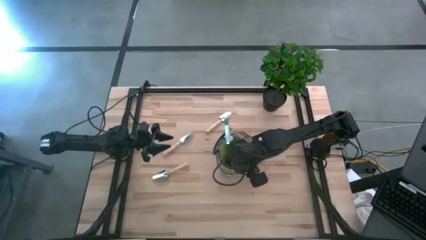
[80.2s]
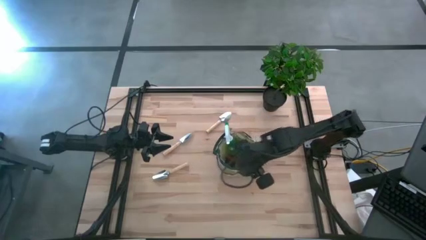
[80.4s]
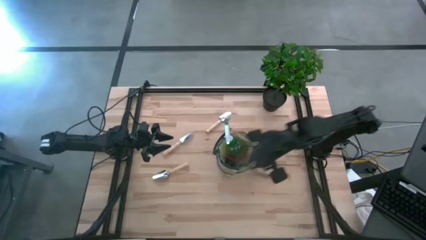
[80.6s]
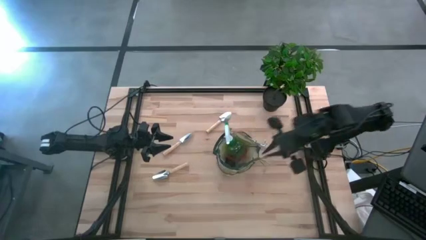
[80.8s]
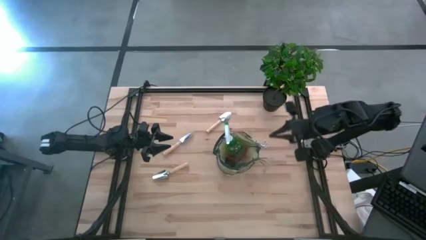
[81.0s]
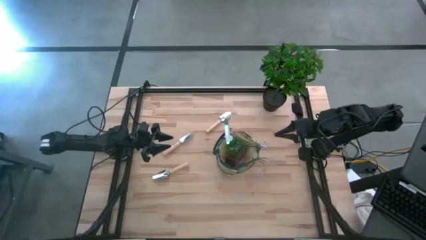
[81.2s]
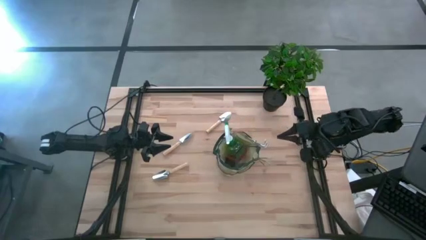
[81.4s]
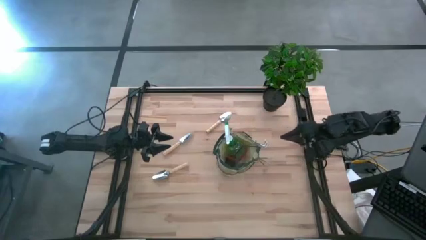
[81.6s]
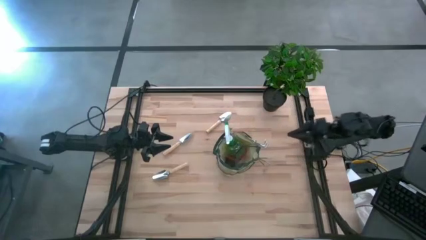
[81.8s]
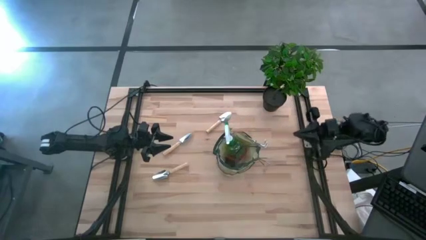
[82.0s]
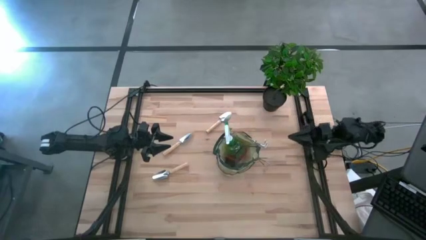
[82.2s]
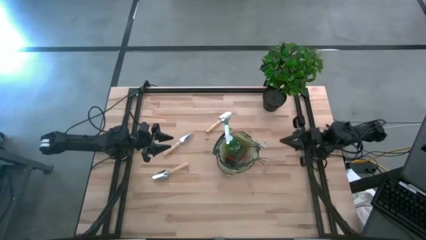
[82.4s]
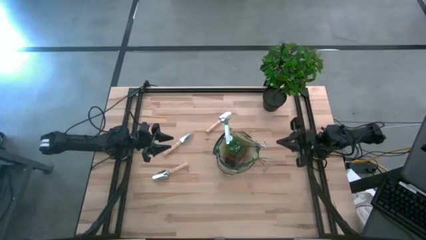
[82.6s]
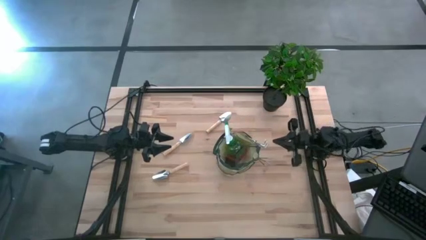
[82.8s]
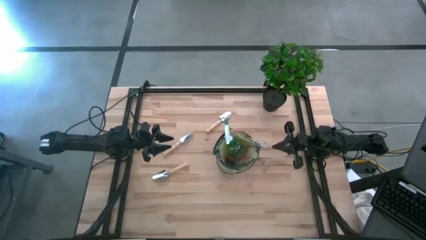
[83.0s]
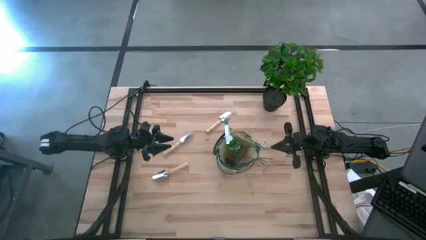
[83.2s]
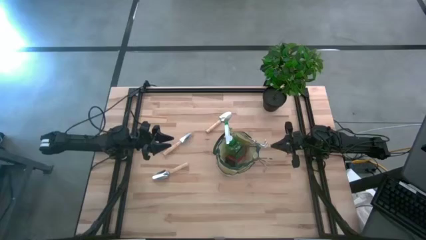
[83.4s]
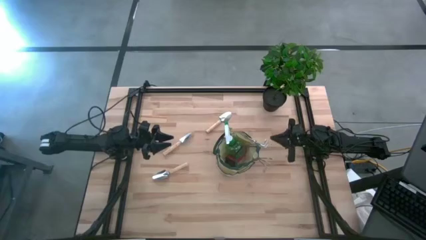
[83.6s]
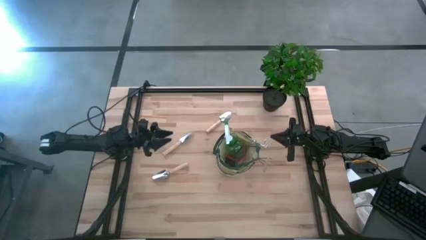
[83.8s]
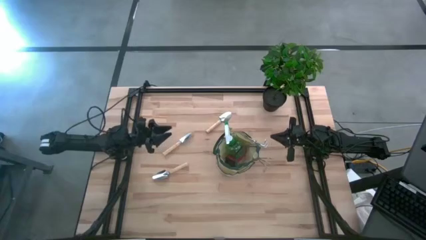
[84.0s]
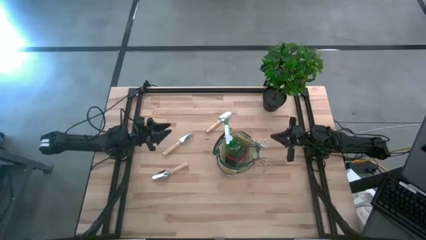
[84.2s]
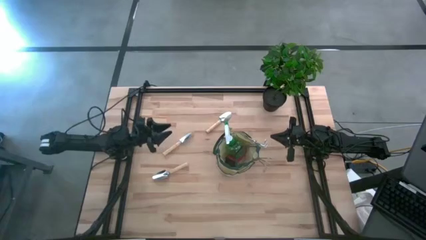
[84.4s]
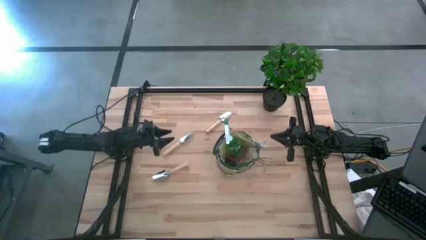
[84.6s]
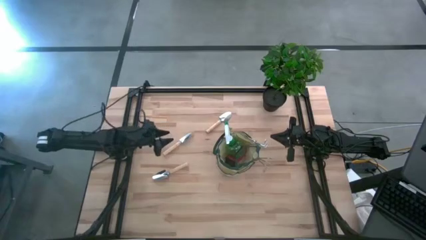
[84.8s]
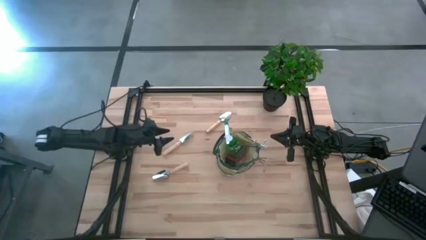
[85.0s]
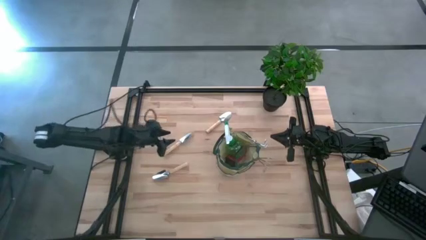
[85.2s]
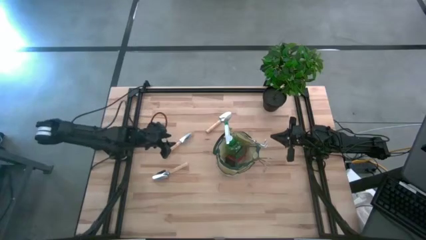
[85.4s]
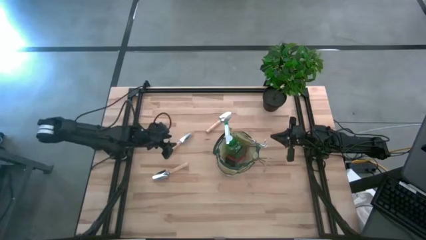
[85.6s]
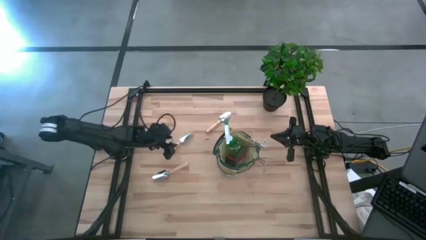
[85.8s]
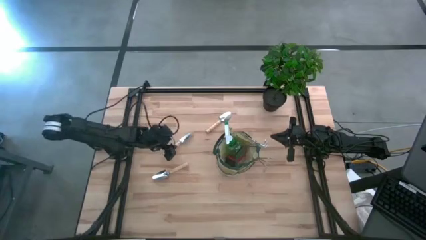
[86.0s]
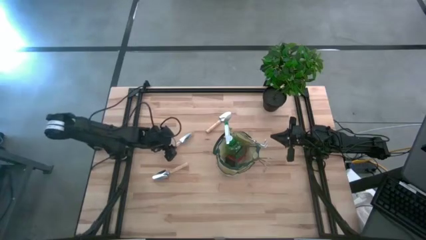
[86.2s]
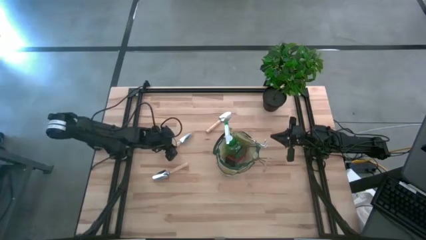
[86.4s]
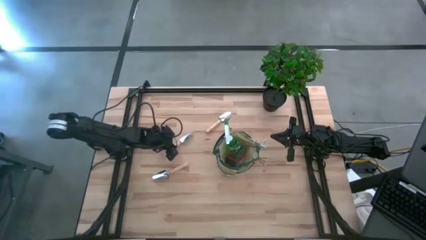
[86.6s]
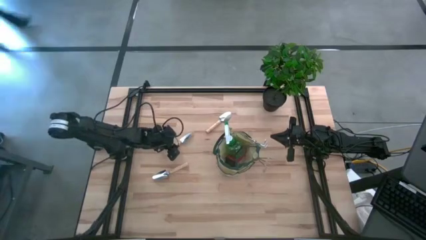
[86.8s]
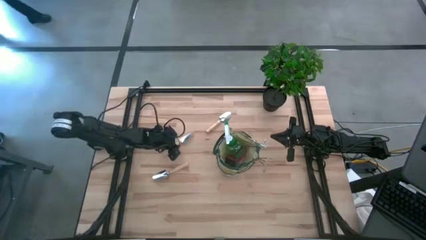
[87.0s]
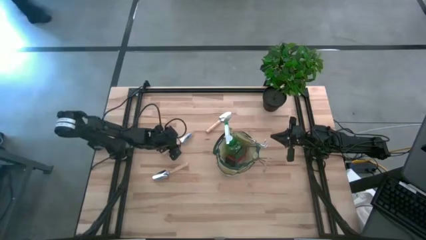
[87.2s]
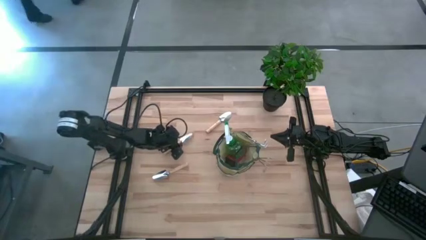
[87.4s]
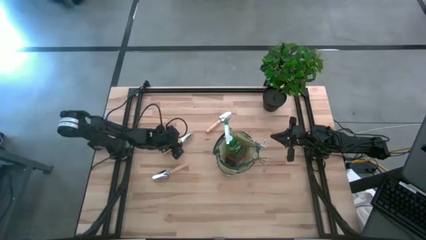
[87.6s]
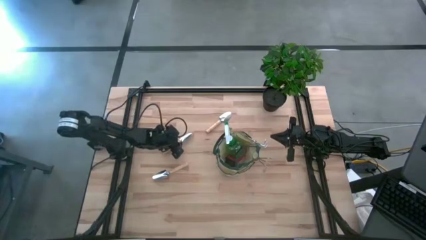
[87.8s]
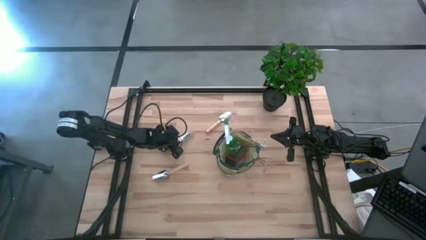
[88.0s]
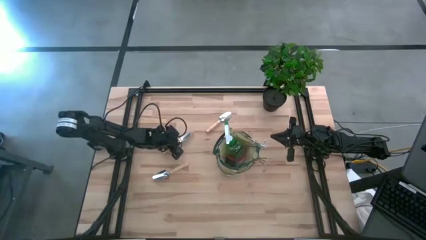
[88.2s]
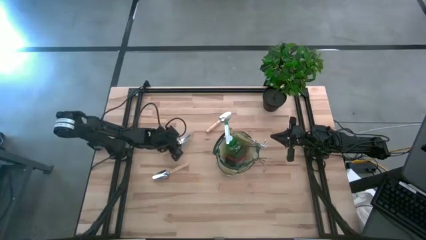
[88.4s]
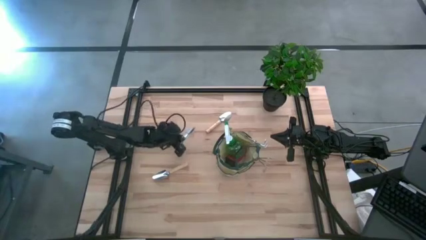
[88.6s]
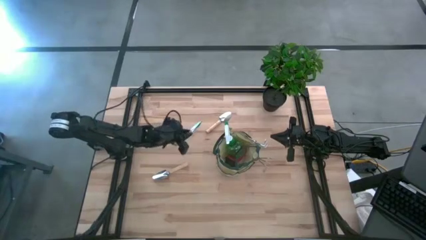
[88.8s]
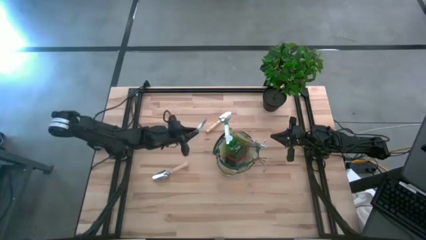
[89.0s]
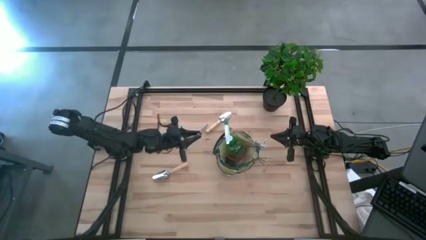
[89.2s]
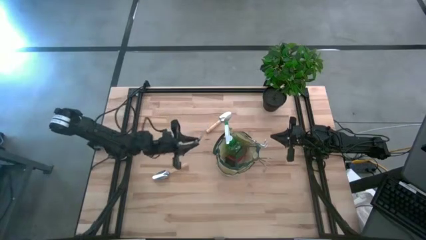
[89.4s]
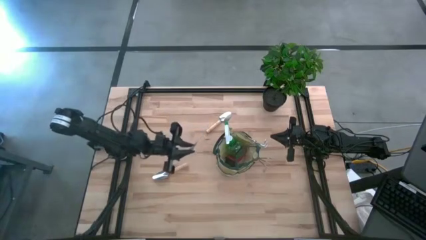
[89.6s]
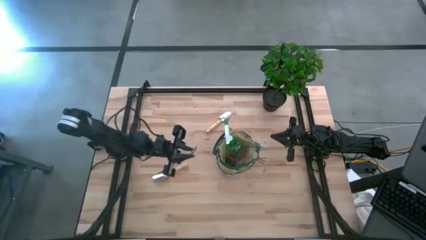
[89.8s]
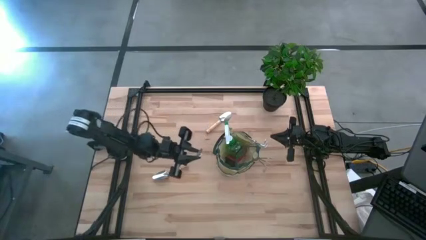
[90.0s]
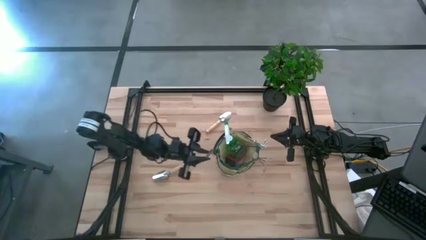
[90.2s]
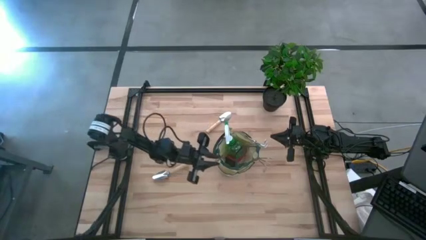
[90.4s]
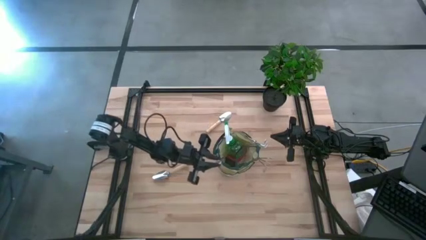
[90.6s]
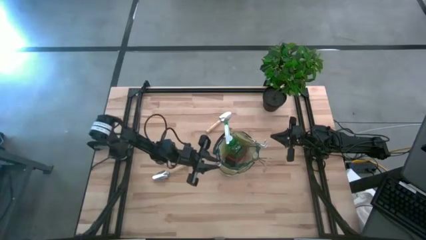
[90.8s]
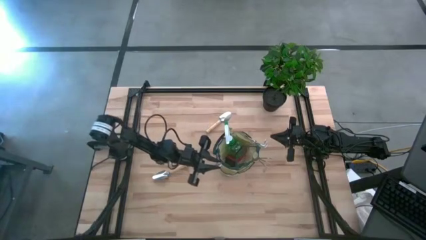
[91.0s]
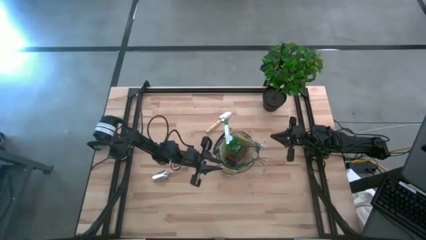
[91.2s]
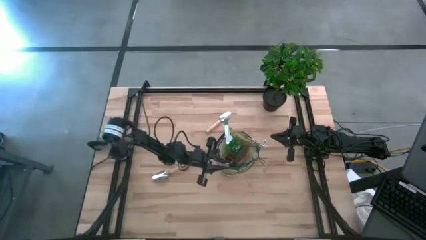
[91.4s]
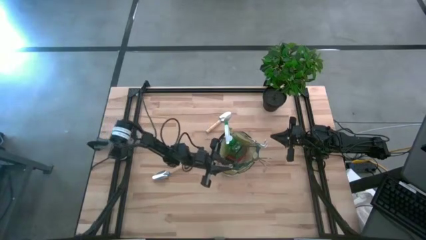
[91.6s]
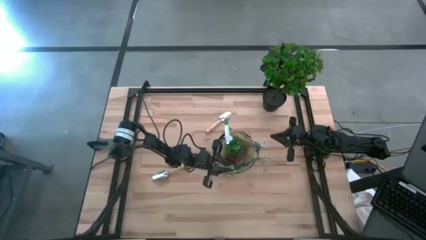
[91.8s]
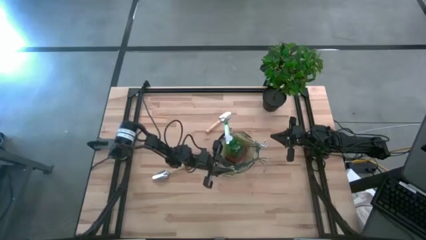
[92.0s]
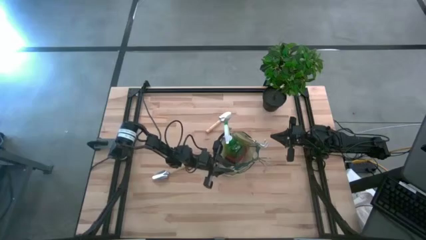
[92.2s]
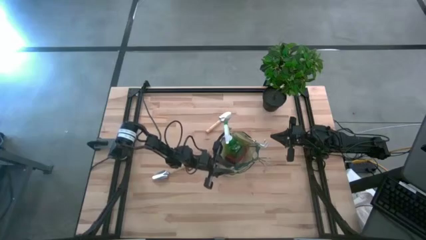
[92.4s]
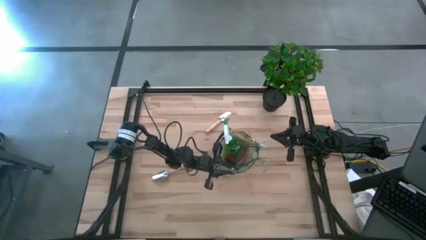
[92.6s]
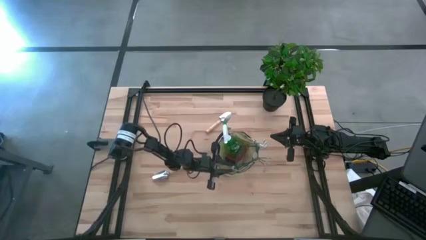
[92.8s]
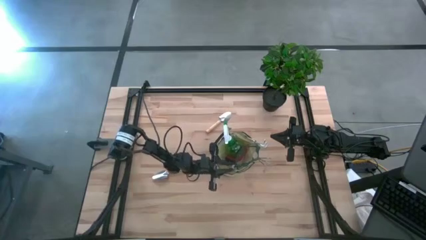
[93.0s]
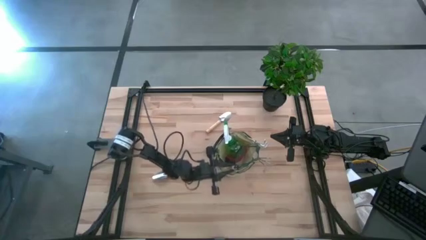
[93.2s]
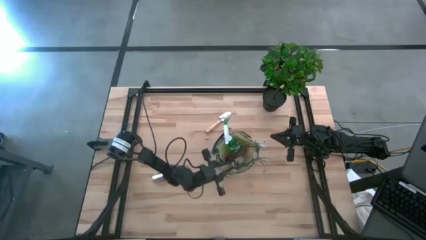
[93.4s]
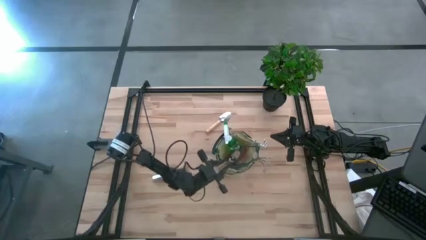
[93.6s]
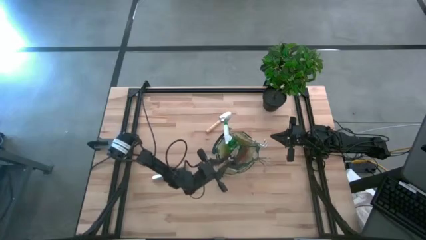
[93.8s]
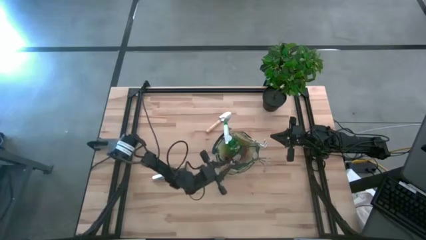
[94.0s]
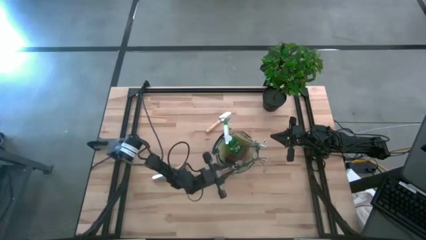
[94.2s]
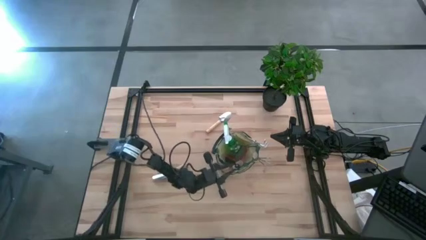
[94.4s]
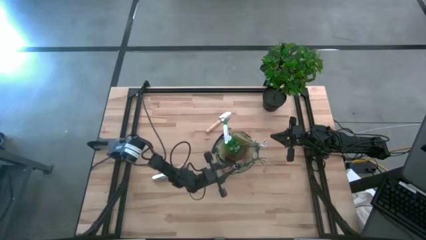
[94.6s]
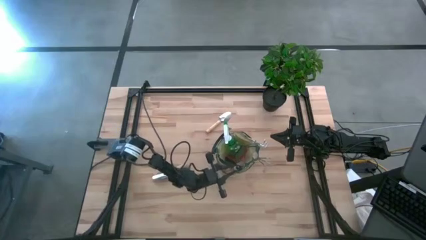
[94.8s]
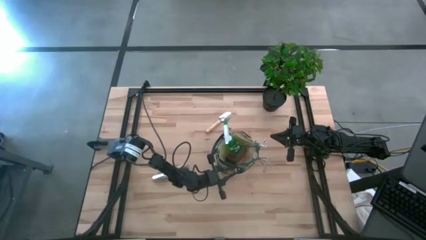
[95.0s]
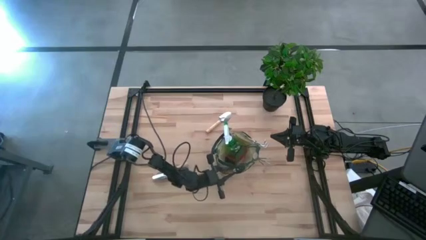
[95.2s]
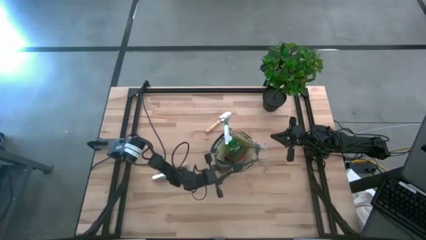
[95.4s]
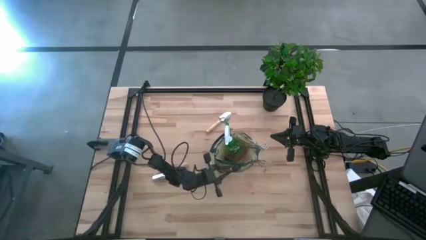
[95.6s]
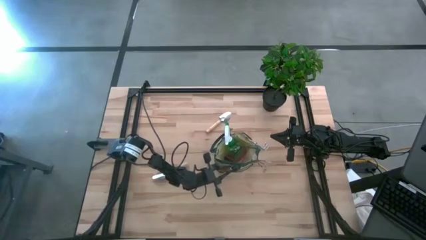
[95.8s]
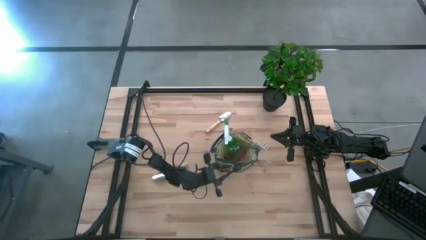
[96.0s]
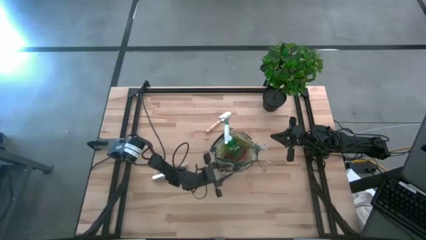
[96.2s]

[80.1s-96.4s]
Task: Pick & Place Garden tools in Gardening bag
Put the middle brown trowel into the green gardening bag
